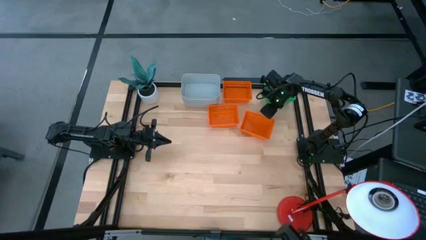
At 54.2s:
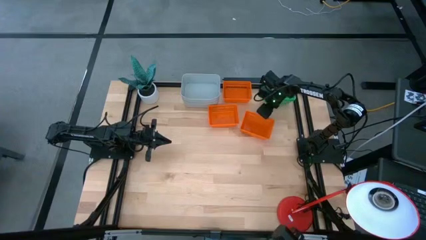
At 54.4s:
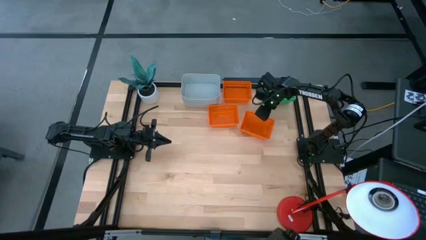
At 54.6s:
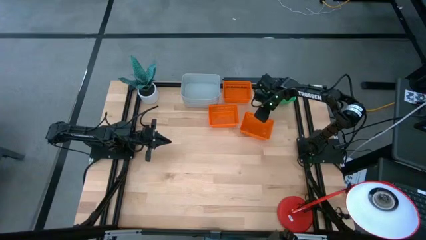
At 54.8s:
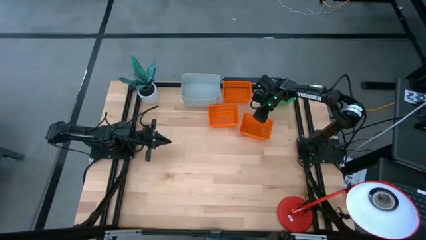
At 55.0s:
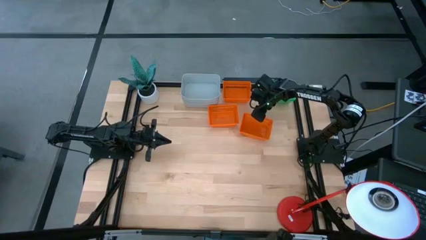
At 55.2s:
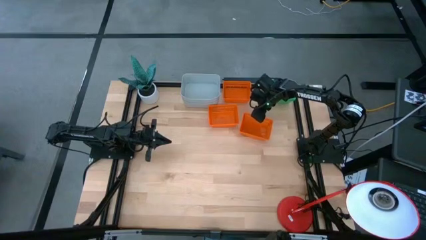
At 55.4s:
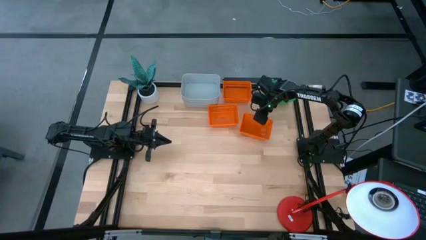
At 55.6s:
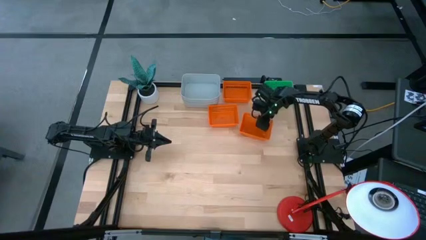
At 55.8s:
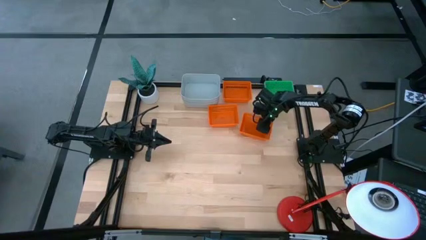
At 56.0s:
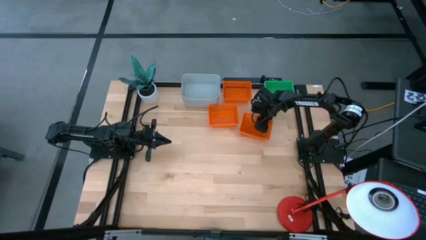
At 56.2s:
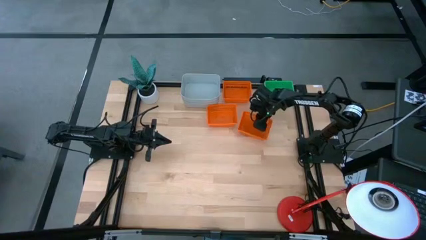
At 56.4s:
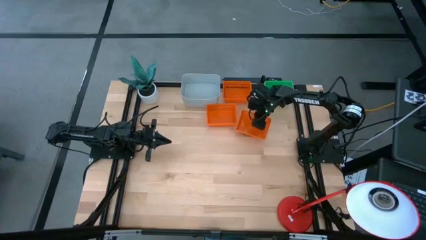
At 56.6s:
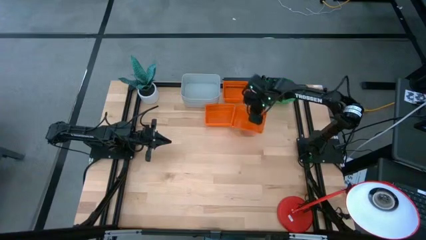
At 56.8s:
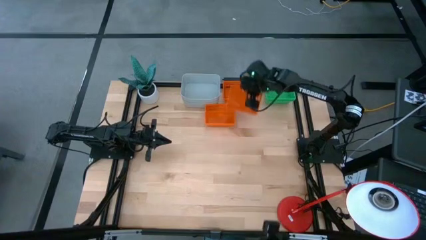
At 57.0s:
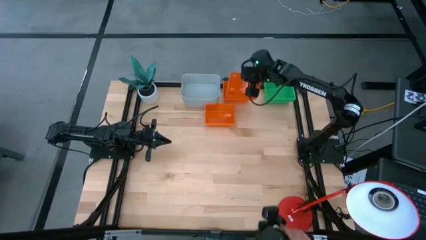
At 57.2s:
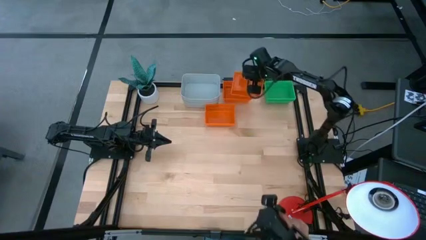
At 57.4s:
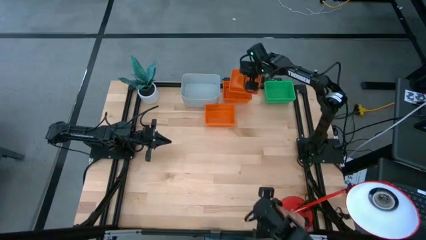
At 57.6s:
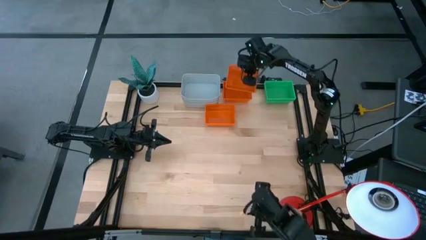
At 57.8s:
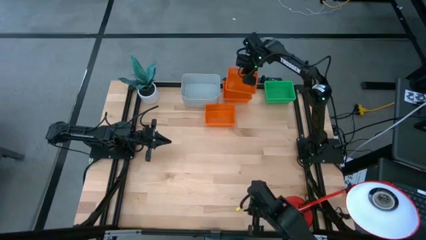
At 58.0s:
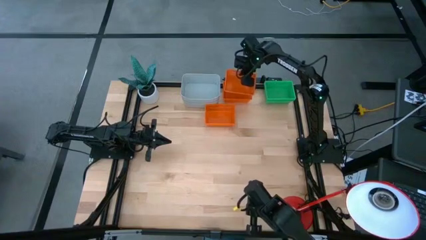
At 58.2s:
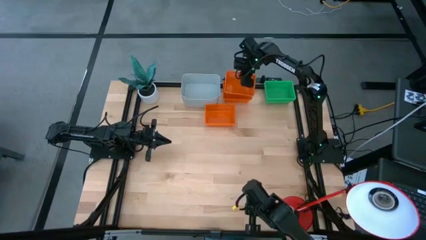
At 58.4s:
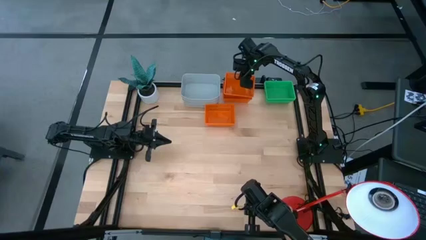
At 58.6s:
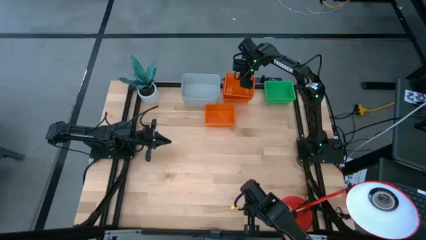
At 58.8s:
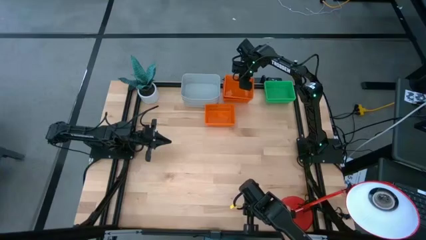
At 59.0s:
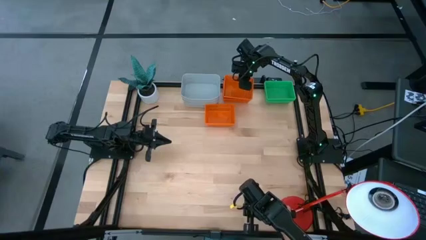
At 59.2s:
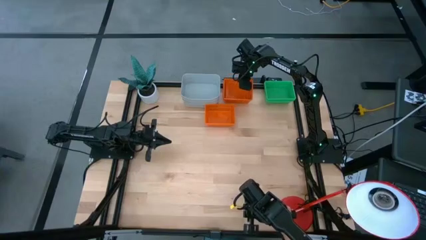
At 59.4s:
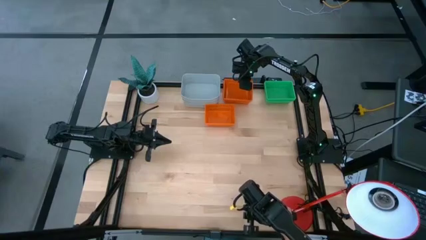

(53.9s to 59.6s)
Stack the right orange bin on the top orange bin

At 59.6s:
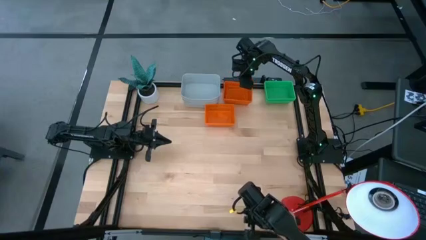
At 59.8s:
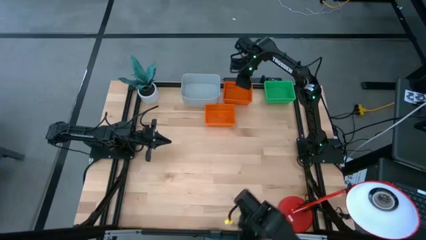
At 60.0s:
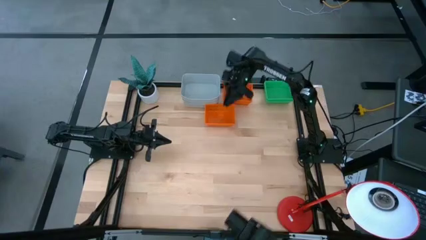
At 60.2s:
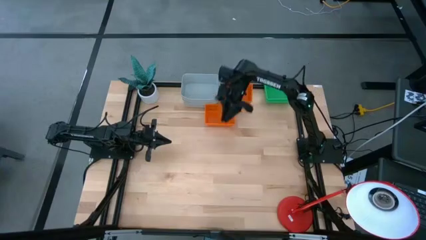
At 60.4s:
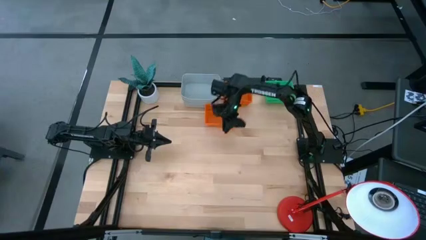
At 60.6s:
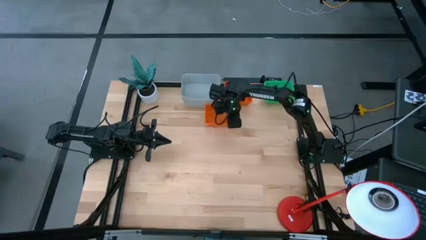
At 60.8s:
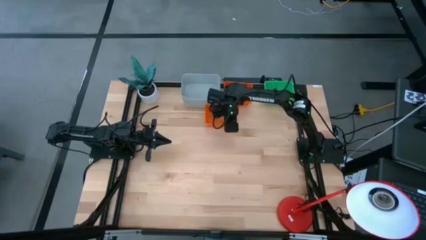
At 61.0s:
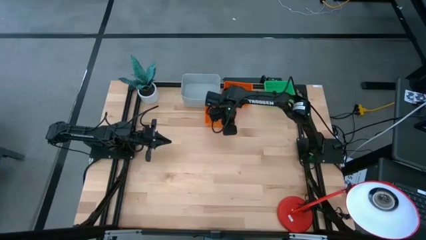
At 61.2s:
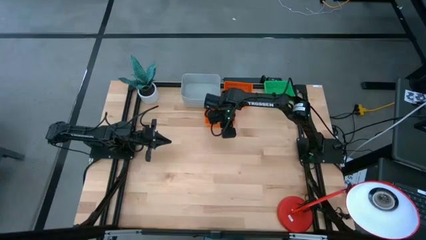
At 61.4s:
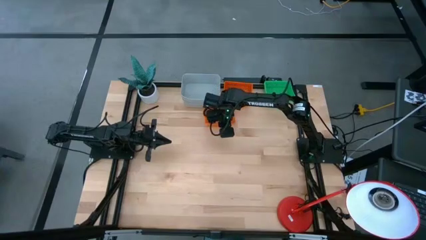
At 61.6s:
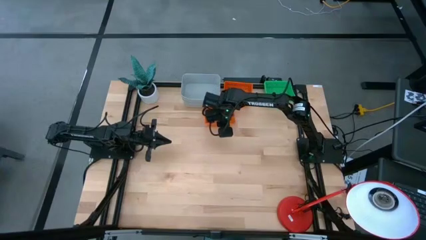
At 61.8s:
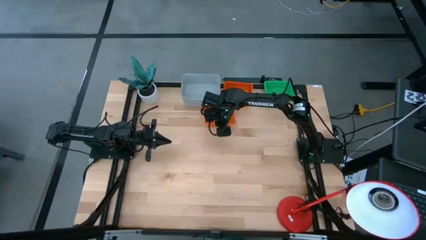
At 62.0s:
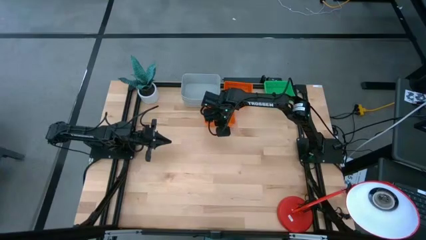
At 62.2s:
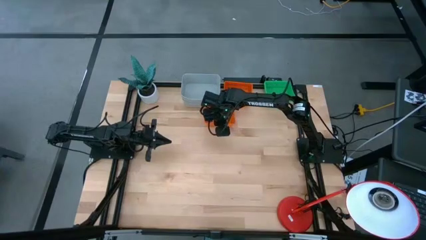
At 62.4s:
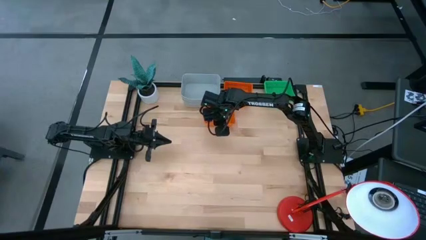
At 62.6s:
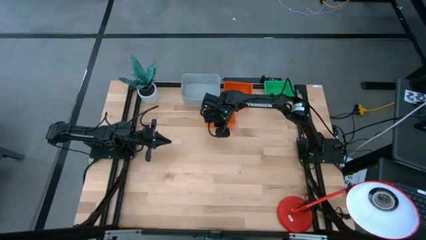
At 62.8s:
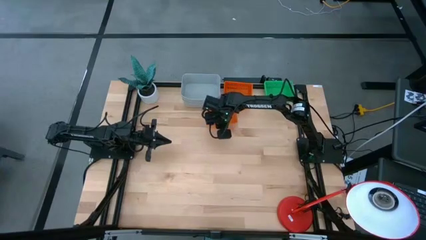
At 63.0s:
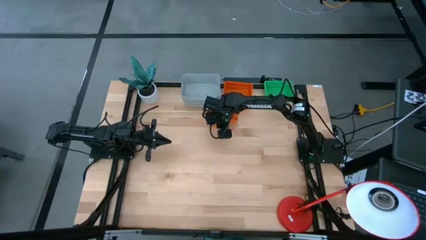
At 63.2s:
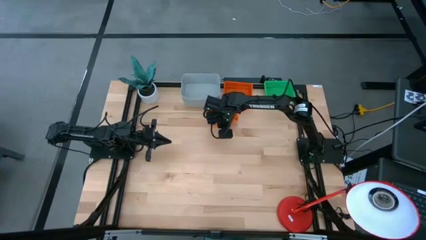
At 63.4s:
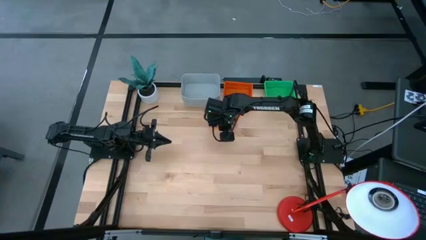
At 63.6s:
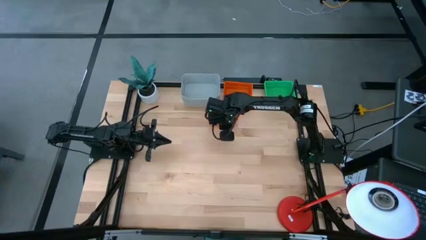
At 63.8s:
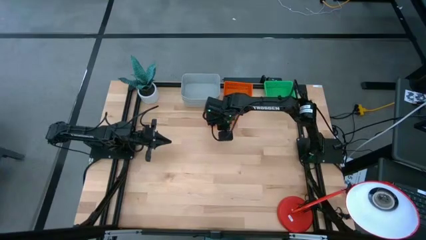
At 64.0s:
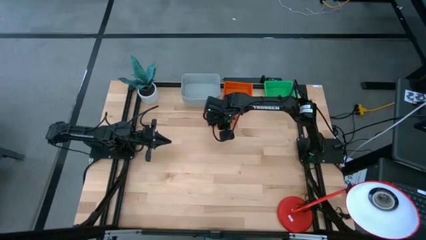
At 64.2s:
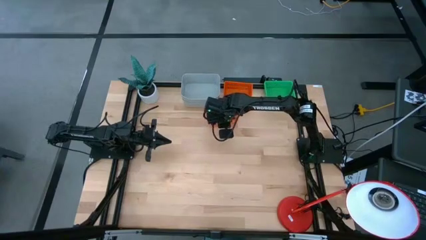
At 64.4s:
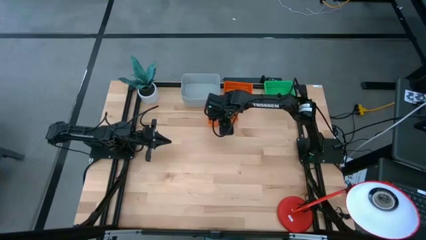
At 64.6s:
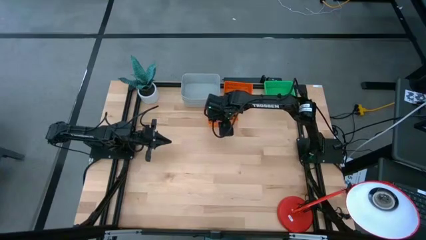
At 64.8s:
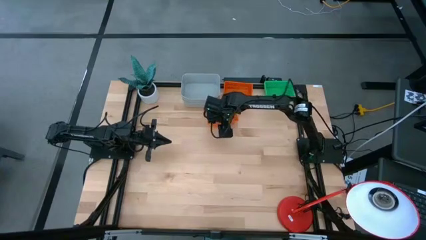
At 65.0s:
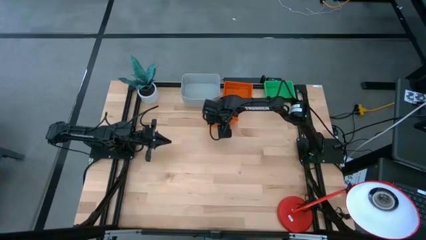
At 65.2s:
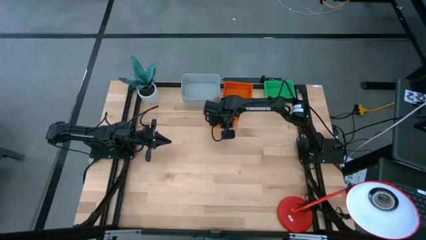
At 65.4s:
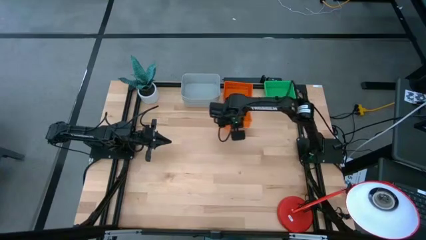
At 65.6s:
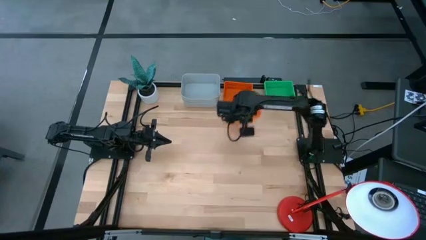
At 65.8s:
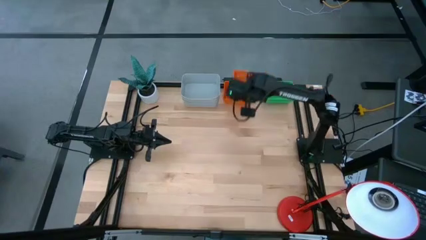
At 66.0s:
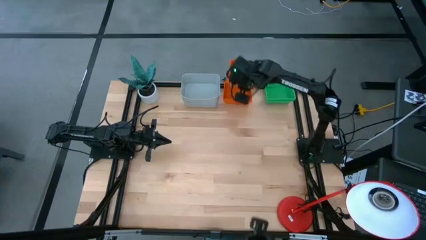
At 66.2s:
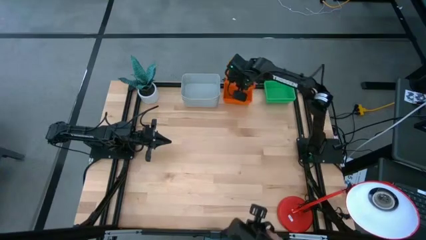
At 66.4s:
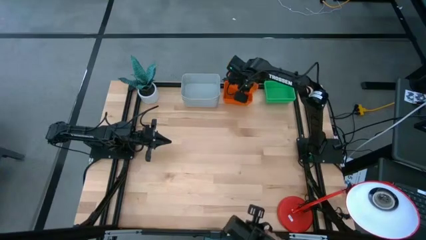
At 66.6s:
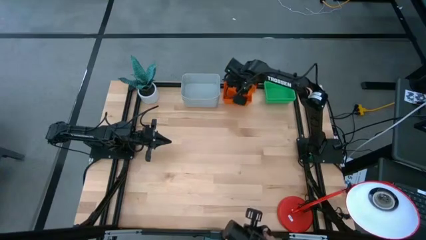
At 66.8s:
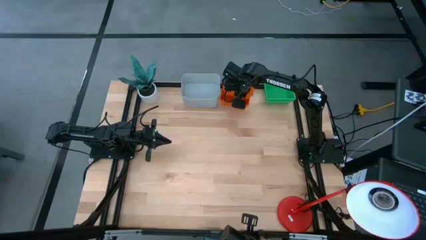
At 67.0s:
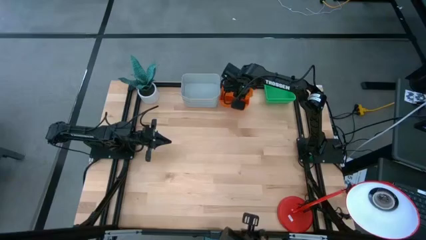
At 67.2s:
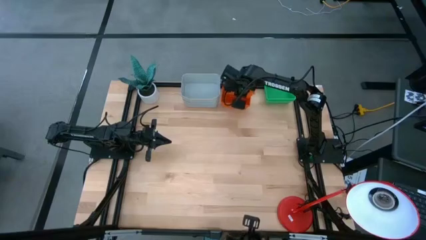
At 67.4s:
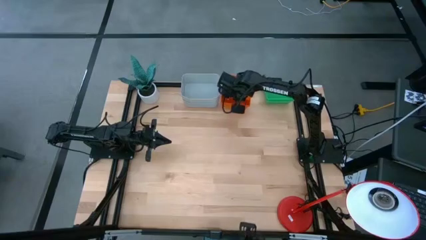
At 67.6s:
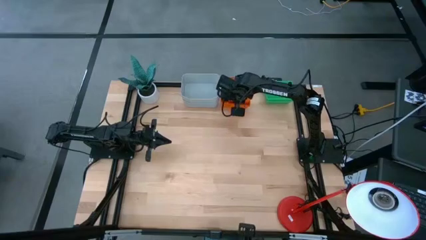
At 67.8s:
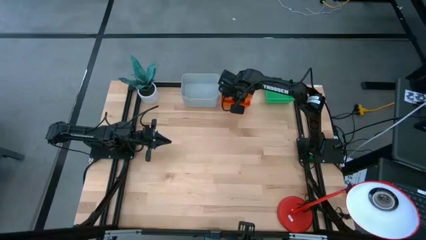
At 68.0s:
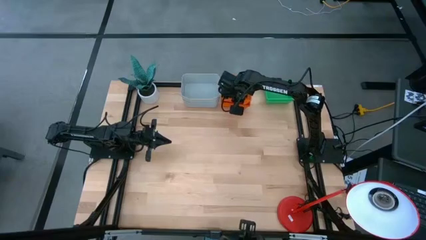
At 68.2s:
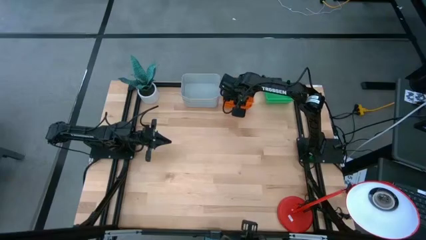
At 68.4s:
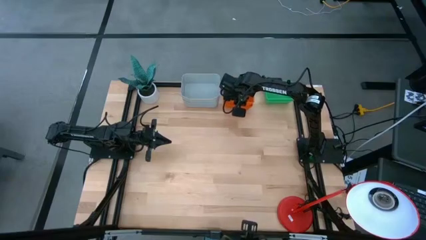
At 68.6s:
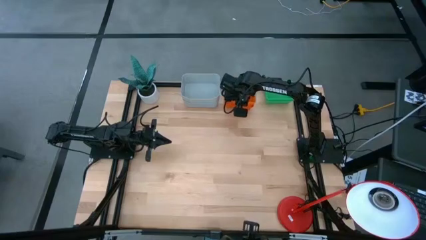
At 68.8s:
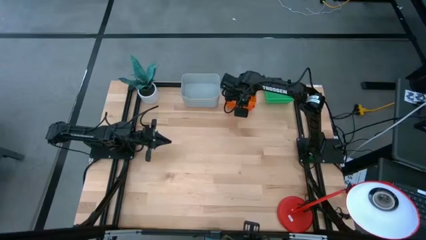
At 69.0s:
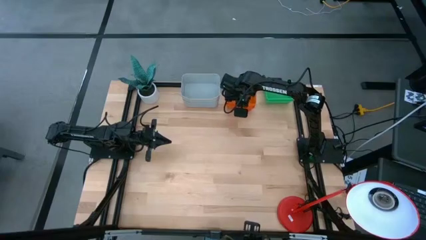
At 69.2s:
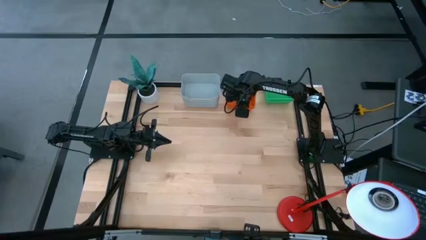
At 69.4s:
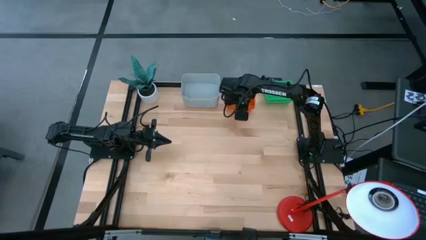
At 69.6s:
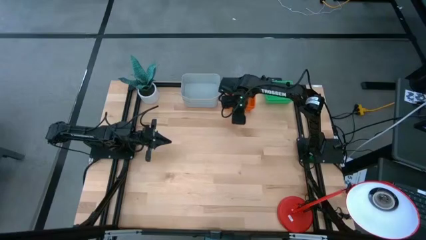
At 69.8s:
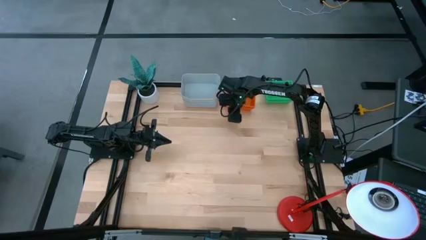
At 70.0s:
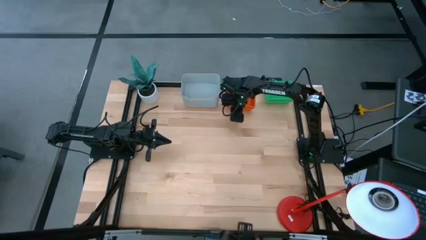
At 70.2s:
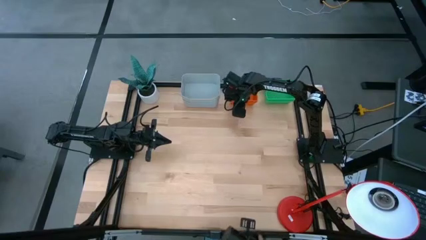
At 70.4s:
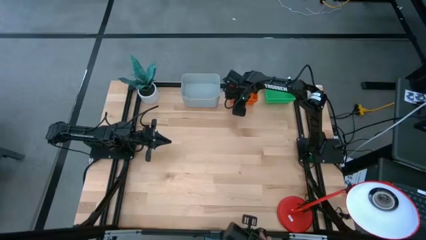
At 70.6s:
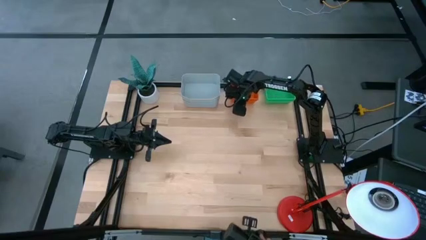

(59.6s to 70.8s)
Stack the orange bin on the orange bins
